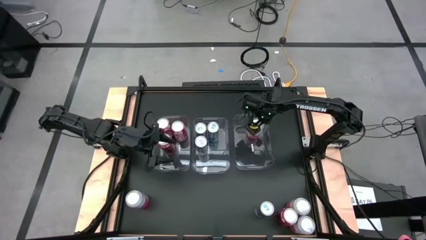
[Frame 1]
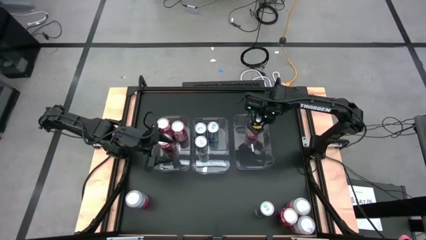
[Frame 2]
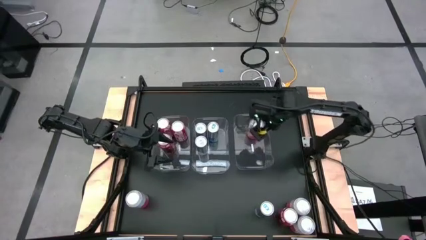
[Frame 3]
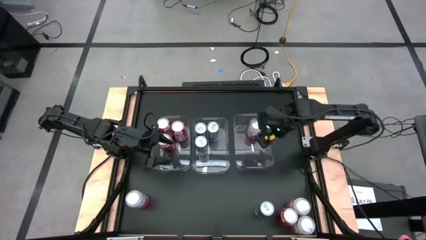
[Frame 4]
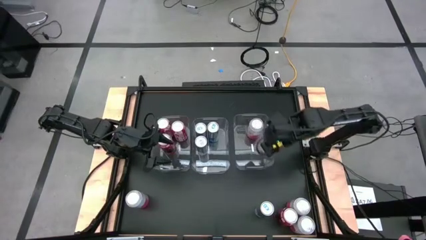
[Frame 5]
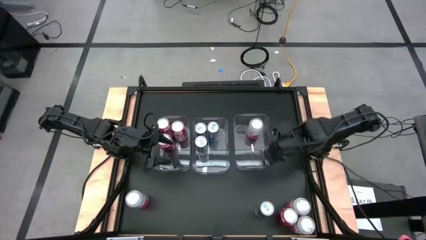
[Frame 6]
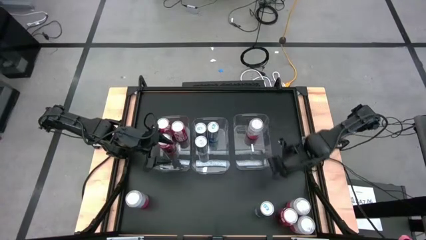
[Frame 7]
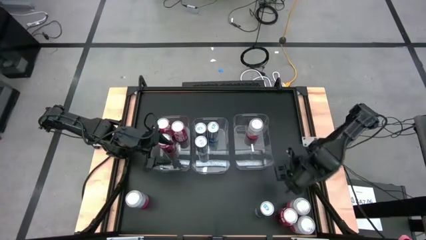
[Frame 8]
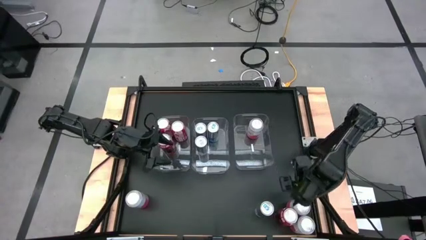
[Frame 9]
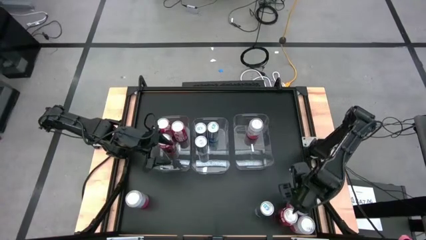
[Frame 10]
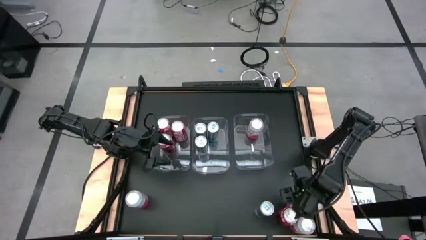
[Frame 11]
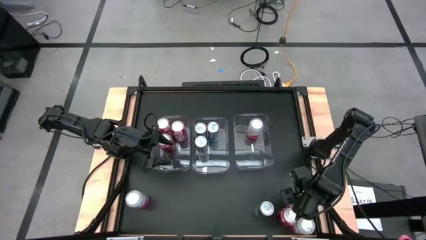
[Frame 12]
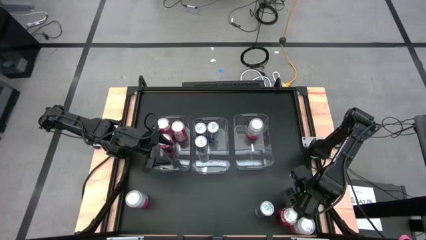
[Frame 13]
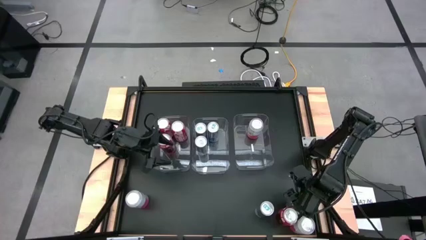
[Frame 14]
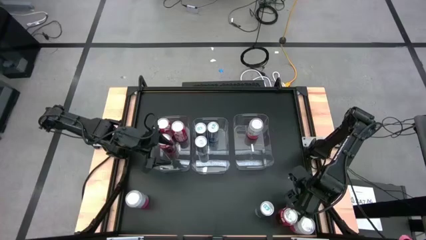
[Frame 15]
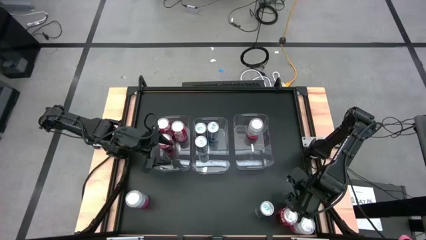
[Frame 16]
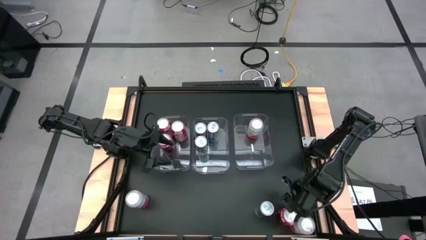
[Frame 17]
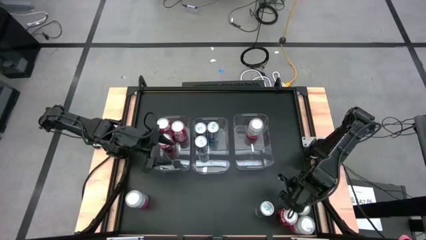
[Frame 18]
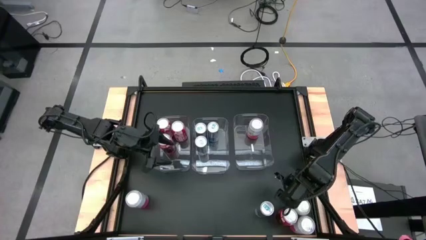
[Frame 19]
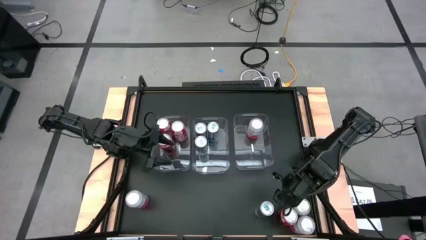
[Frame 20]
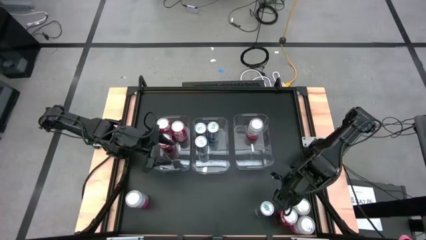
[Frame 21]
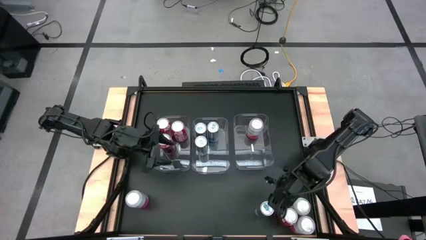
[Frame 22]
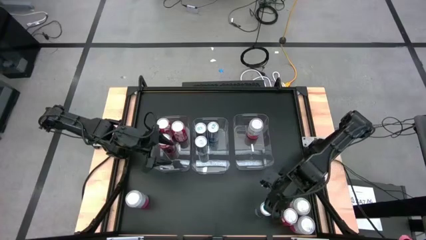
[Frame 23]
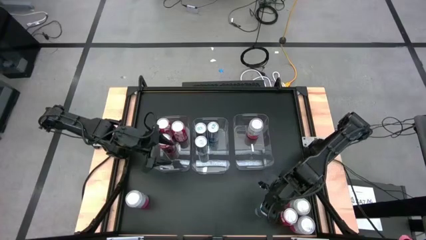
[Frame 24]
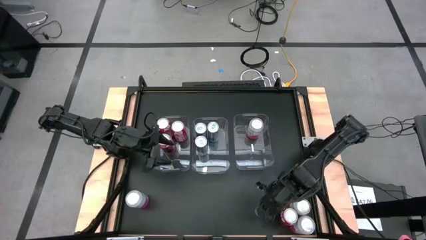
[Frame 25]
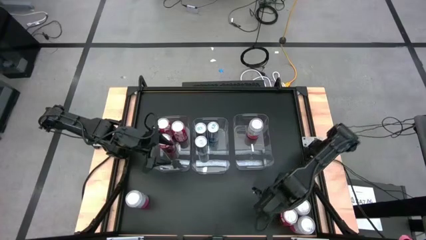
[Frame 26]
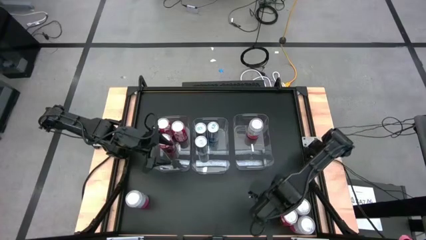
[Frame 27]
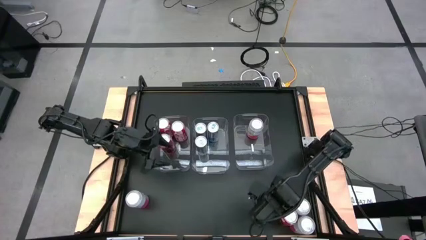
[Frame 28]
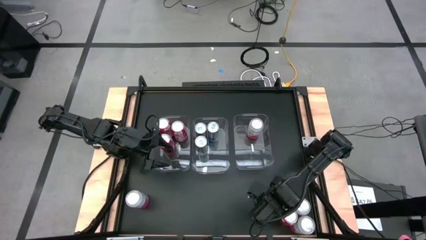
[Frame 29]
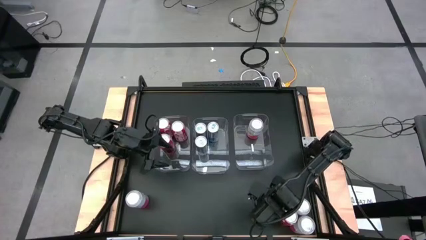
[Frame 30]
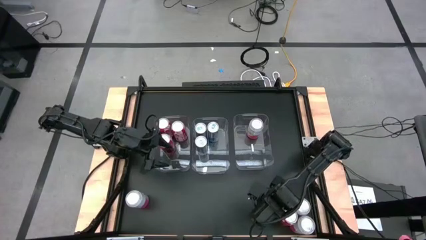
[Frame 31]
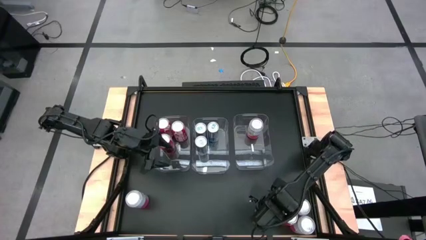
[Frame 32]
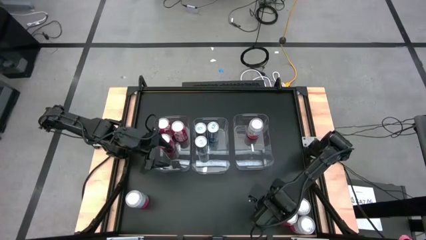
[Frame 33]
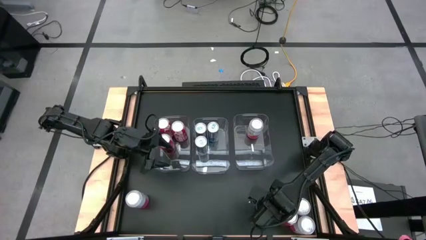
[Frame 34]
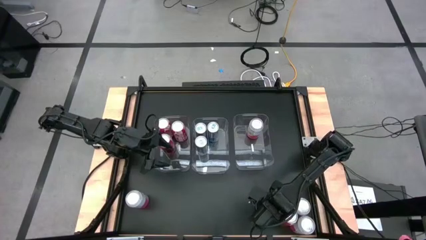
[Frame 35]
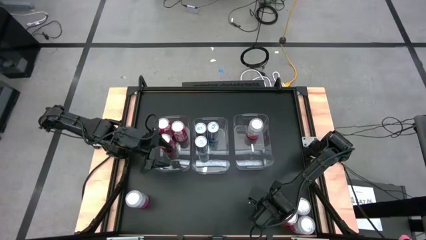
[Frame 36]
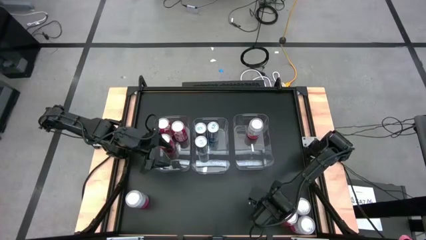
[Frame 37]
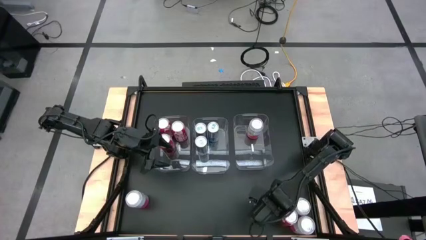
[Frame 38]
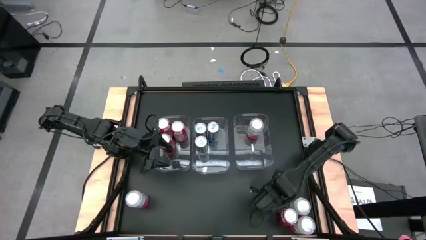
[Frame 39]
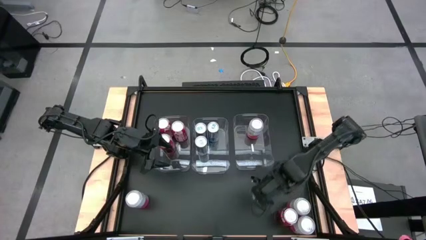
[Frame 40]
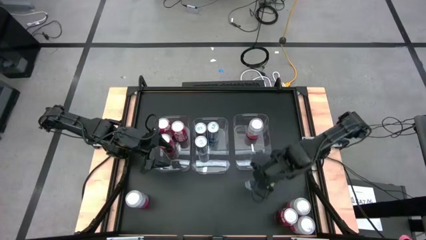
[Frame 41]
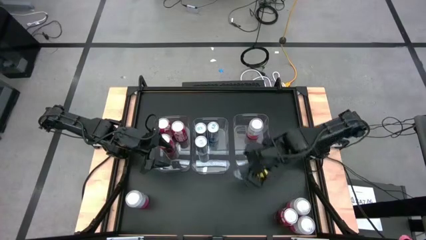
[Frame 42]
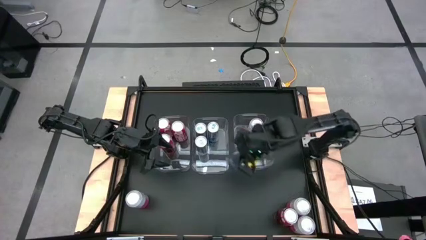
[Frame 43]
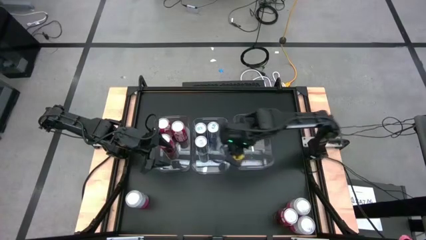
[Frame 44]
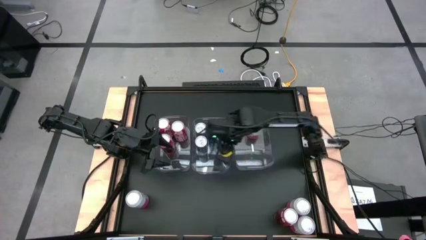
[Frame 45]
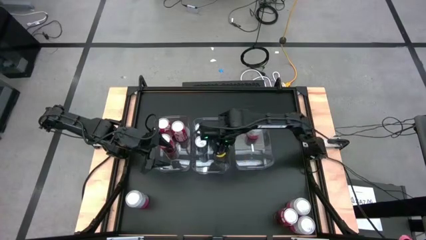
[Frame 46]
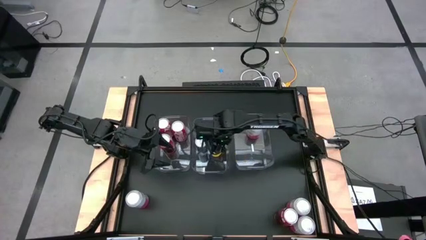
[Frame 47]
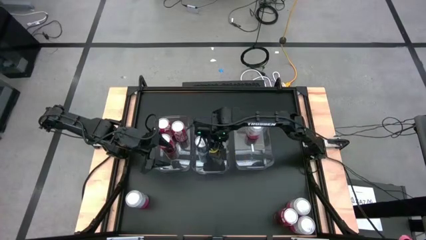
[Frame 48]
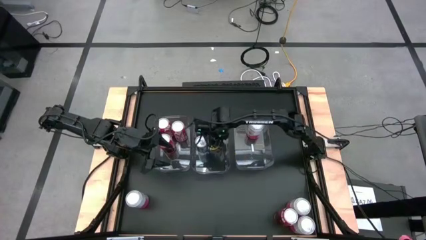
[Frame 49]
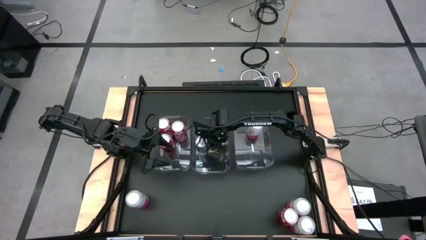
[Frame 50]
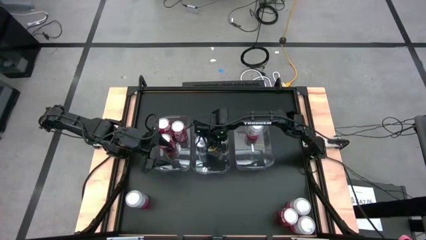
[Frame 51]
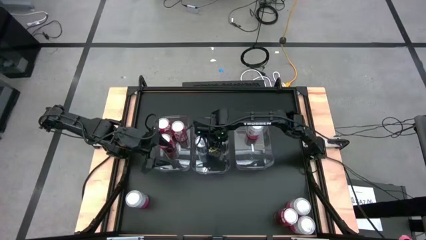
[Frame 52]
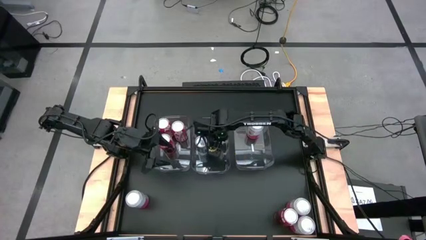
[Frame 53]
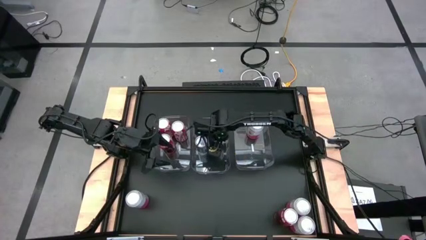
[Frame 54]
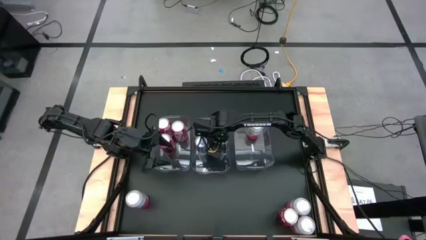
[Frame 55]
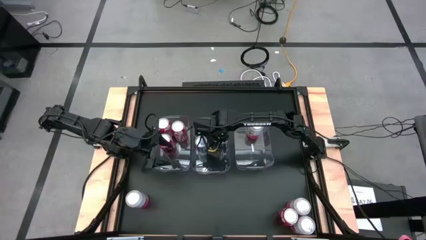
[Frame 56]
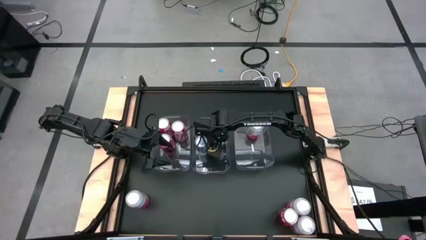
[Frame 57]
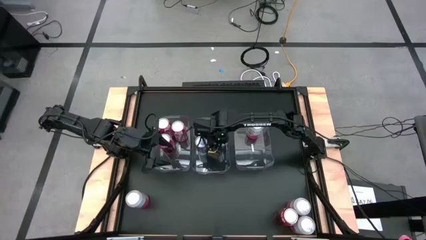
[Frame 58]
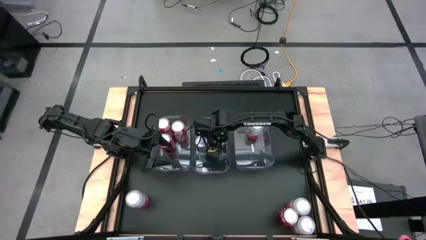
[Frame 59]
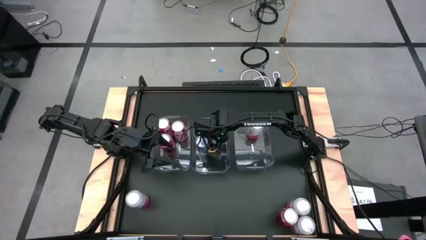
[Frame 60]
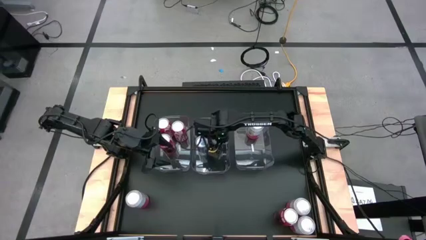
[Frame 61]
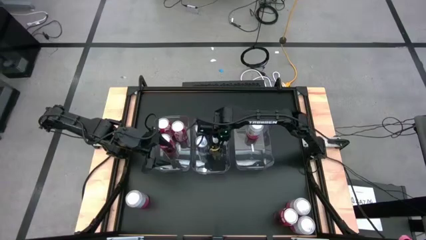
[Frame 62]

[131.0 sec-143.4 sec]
Task: Sort soda cans
Put the blue soda can into the middle transparent bin

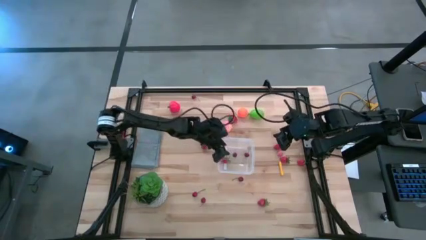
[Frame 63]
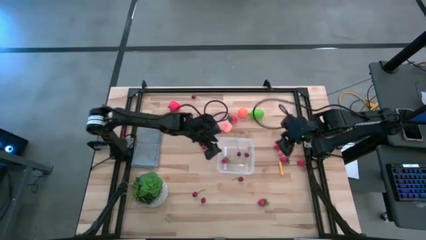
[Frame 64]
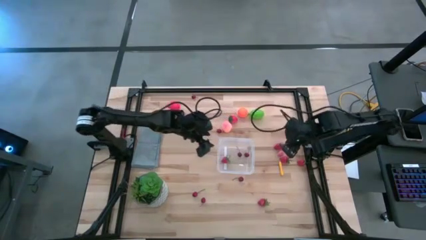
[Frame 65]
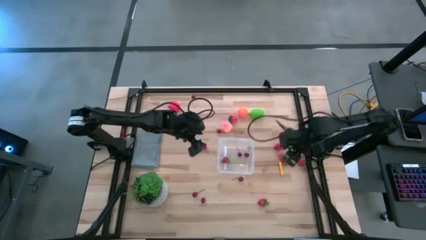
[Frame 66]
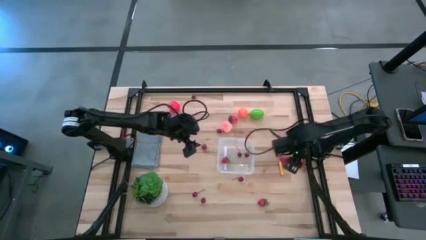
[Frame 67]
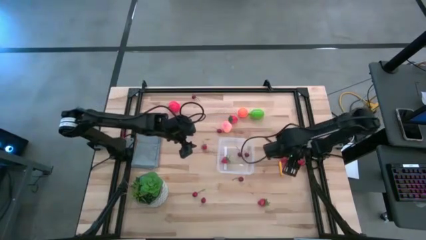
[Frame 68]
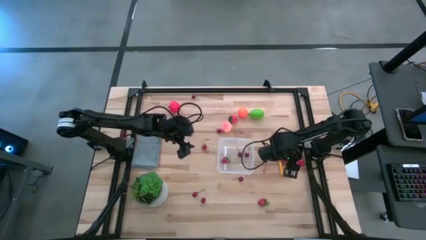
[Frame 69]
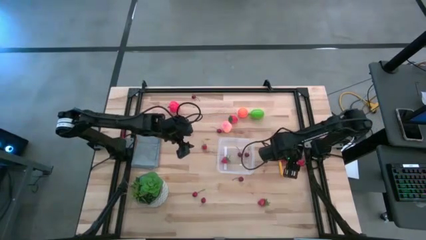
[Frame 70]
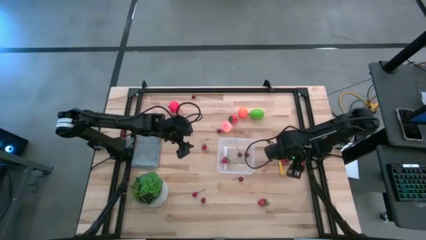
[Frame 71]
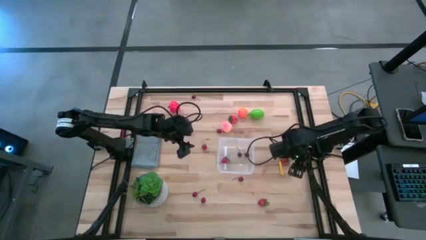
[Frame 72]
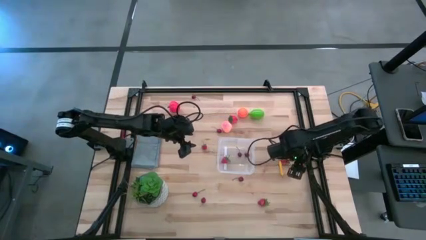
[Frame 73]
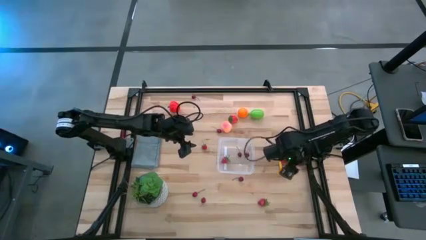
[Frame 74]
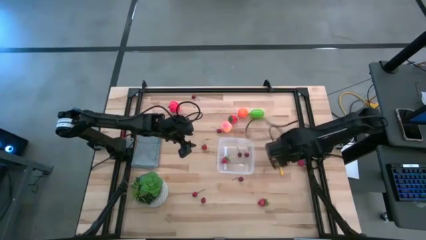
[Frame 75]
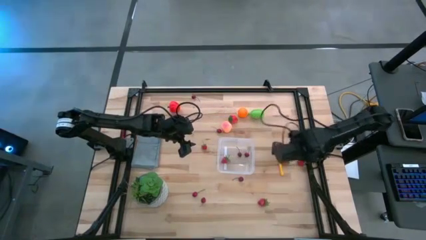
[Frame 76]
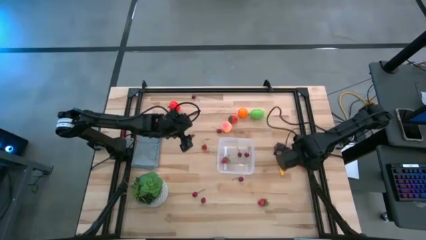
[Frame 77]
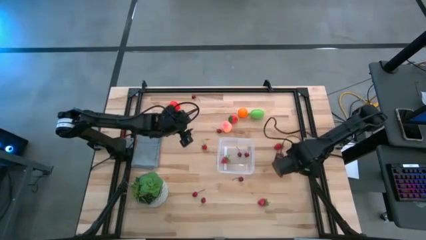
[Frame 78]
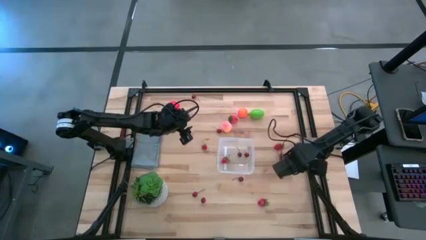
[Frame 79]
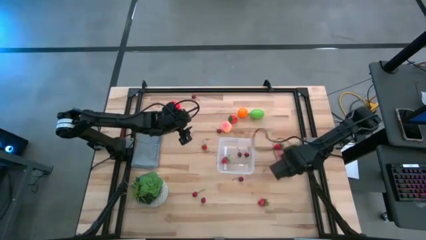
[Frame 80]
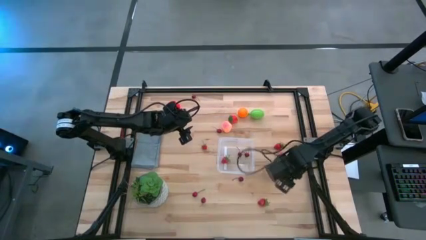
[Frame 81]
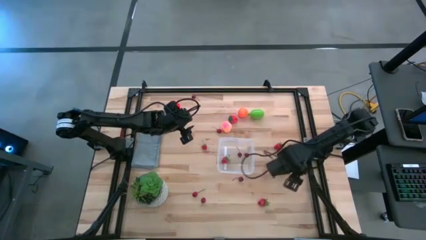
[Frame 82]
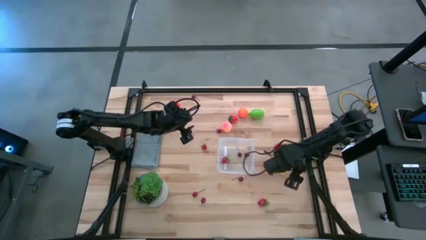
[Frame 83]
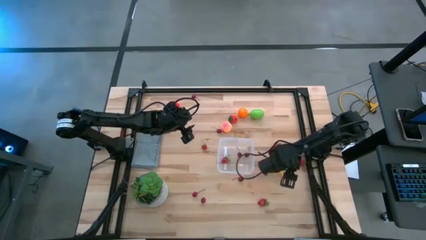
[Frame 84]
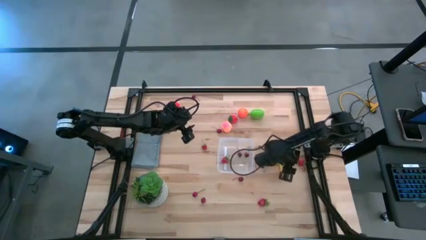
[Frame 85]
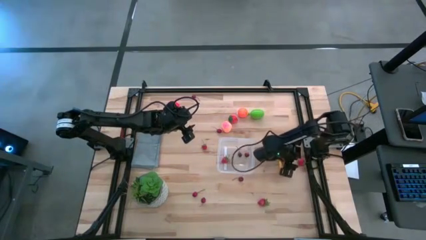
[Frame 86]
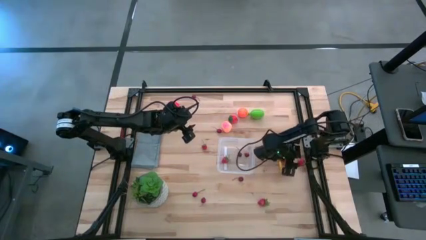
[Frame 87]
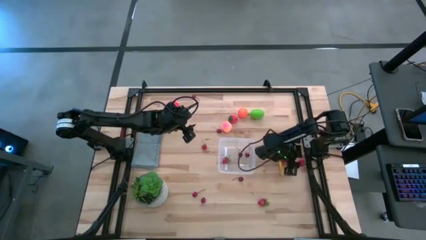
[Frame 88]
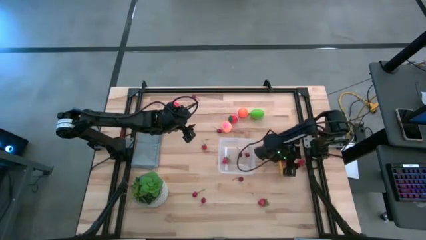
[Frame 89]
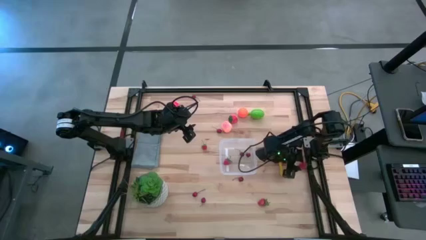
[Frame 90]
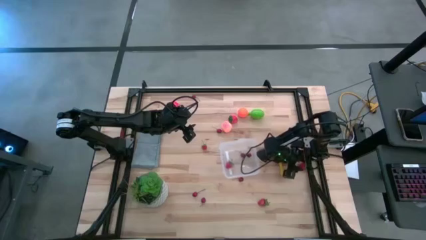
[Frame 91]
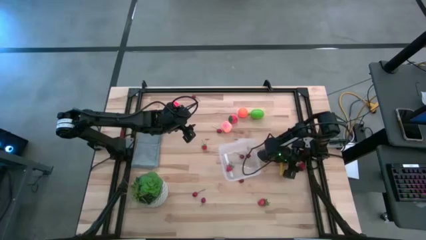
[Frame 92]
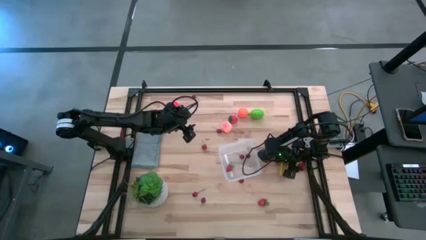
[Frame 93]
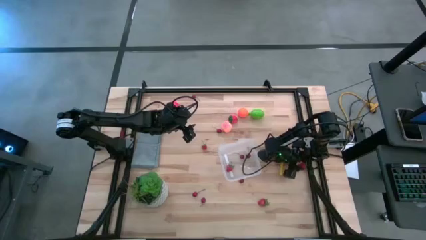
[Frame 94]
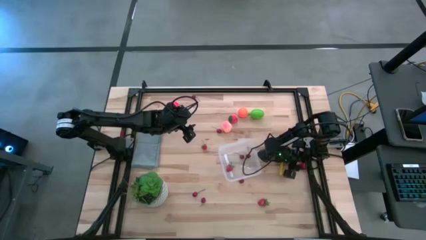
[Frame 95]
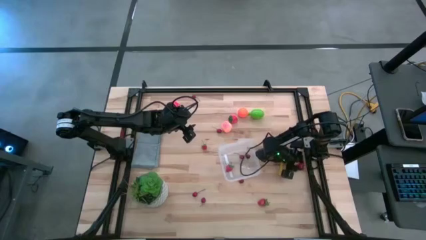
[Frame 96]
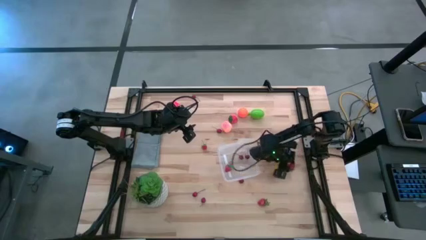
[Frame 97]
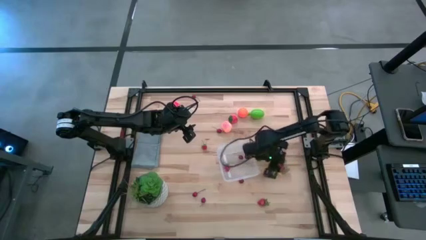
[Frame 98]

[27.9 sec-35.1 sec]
Task: Pick and placing Produce into tupperware
Put the strawberry into the transparent bin
